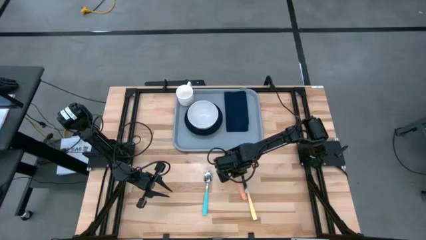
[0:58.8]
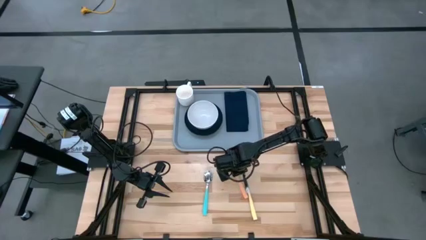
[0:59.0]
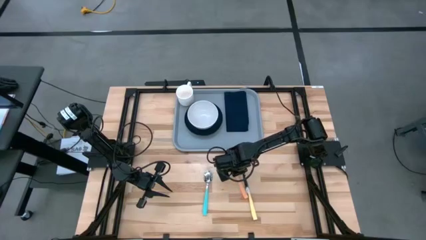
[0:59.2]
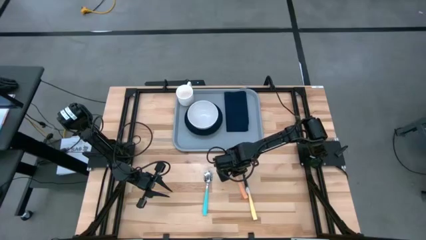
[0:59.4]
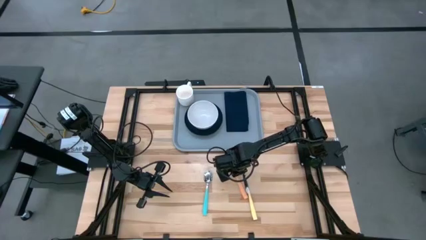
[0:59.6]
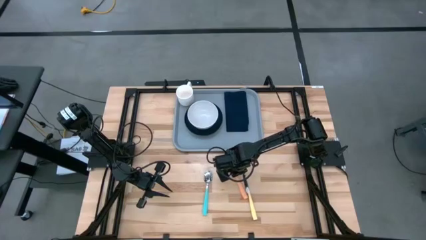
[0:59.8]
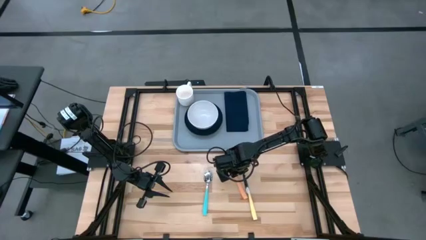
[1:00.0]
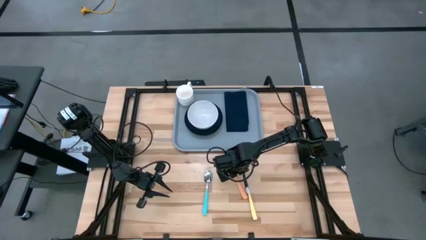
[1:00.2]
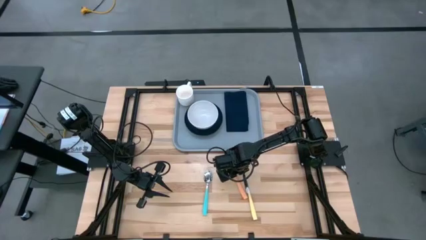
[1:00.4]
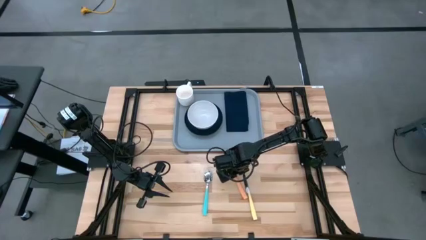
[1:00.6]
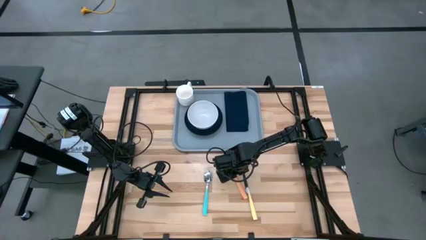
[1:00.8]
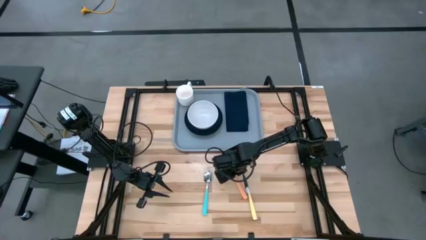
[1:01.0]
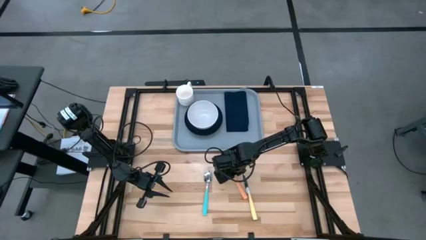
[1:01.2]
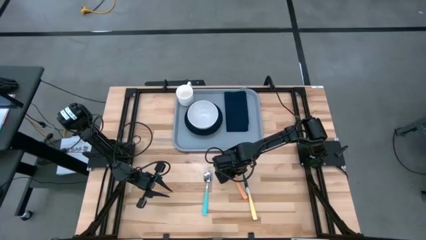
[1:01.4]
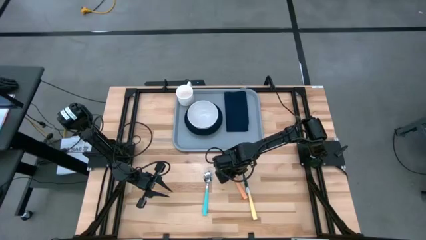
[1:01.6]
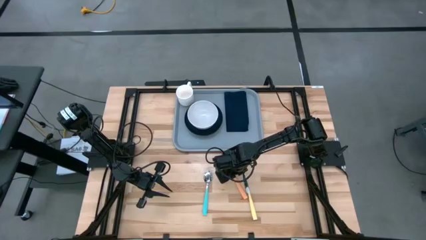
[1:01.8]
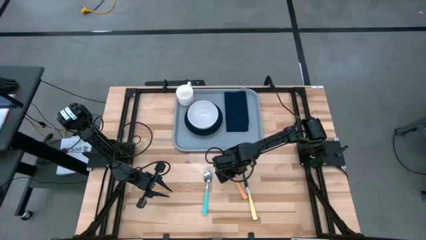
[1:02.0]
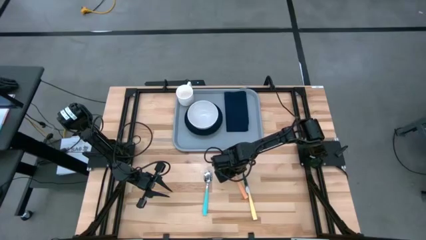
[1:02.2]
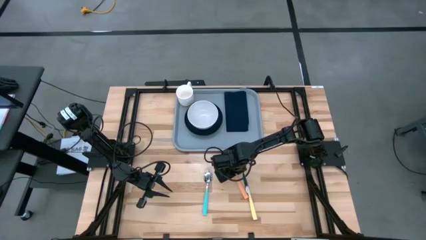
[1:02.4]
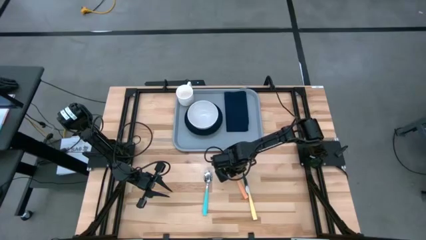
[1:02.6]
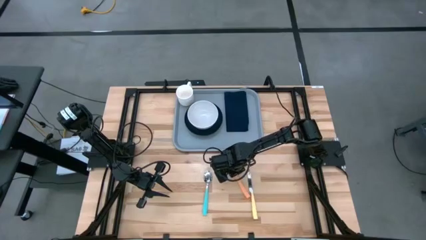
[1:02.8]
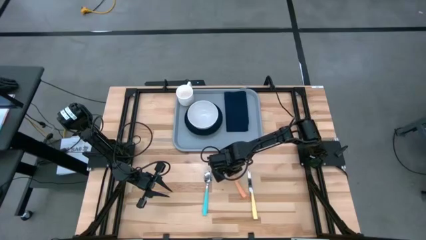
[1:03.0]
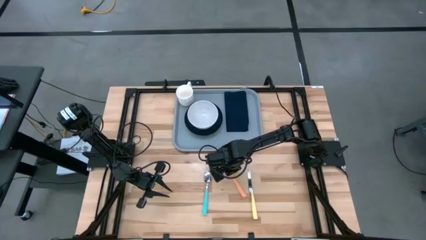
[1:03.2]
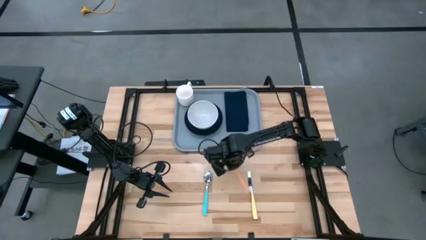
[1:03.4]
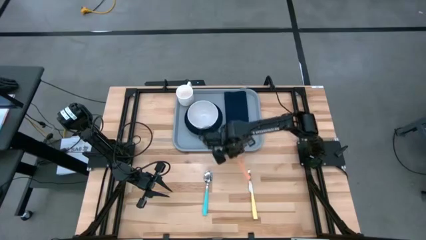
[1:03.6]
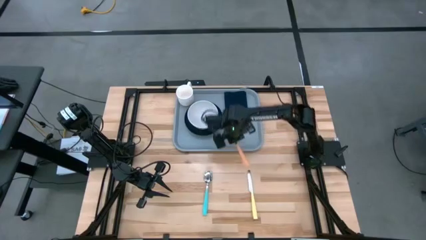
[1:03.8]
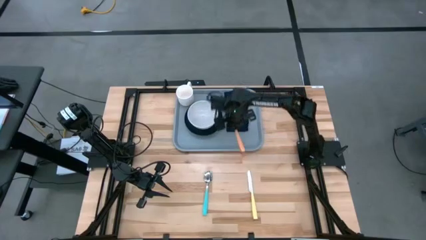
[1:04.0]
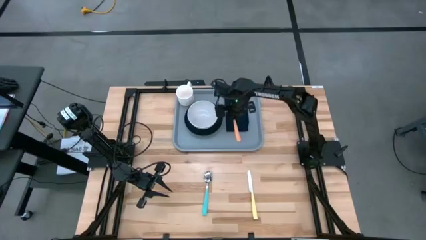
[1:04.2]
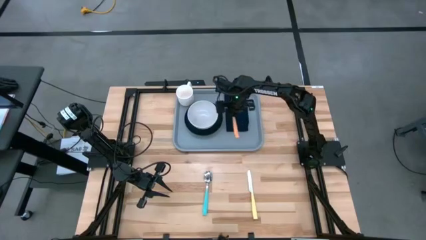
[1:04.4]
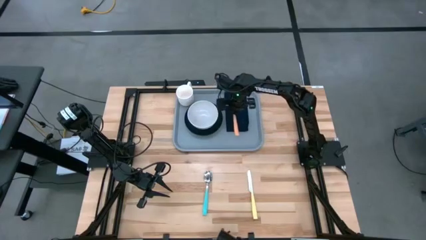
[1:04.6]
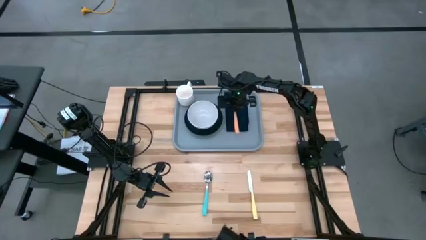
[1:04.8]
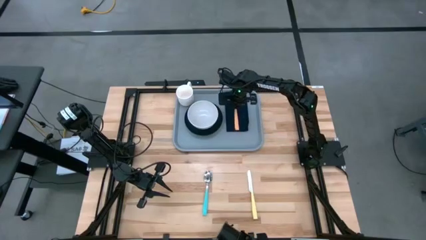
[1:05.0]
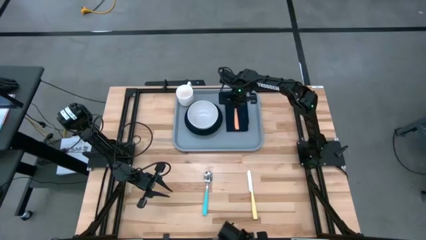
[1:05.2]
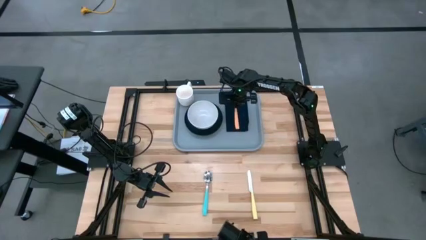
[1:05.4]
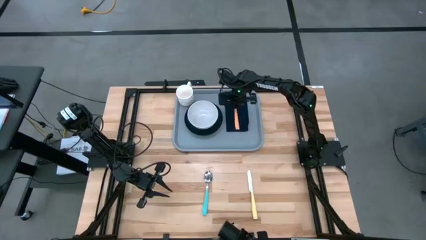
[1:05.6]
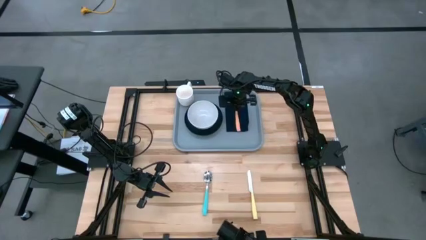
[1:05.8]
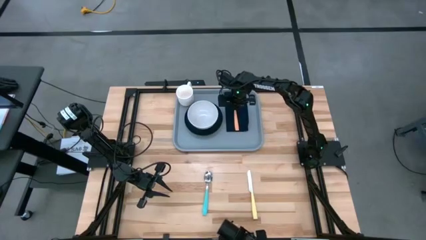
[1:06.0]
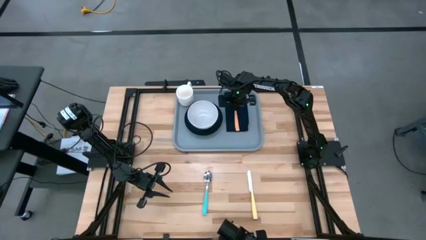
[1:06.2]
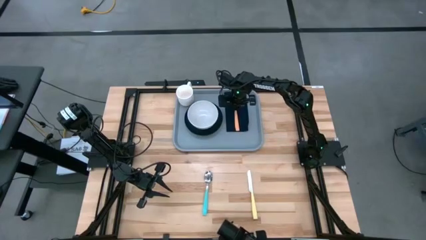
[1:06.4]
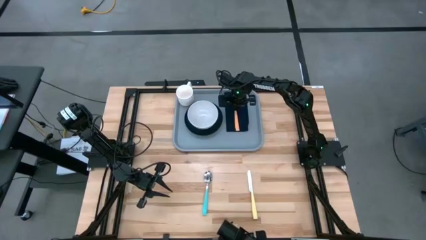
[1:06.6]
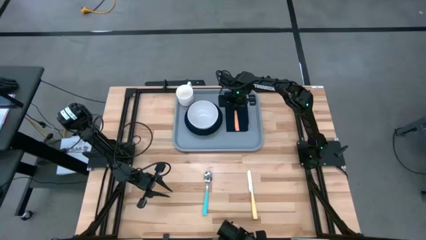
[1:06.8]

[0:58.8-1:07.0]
Task: Set up tray
Put the orange fork on the blue napkin to the right of the green plate
